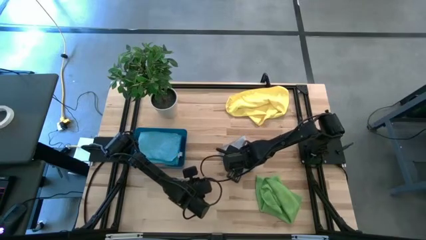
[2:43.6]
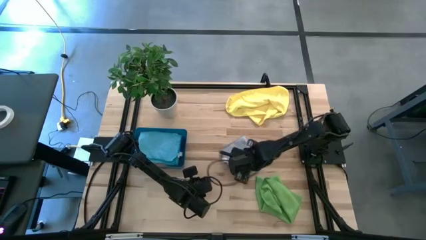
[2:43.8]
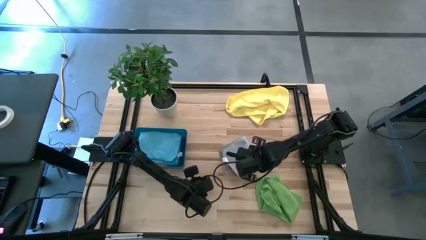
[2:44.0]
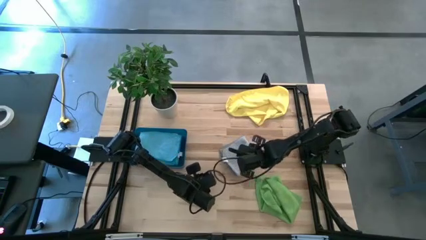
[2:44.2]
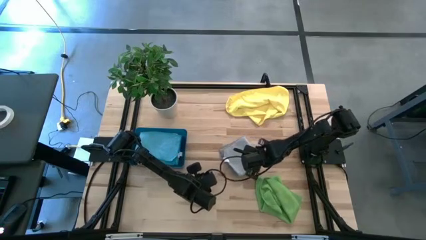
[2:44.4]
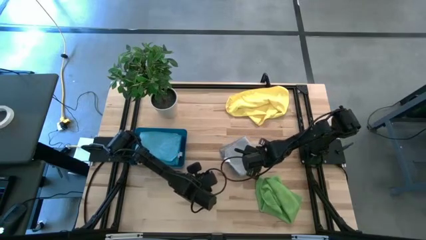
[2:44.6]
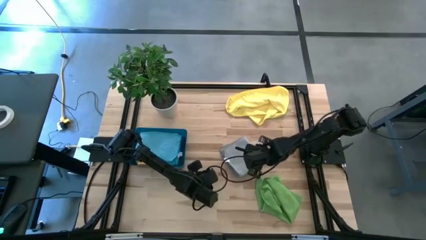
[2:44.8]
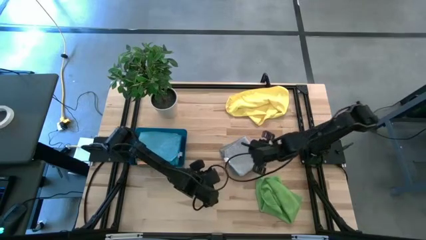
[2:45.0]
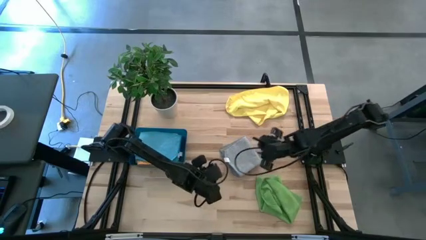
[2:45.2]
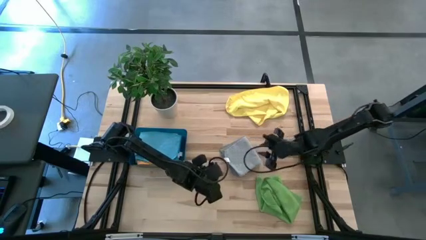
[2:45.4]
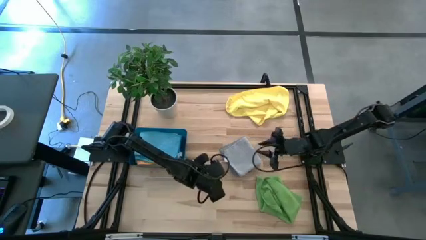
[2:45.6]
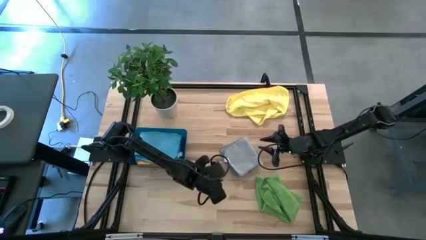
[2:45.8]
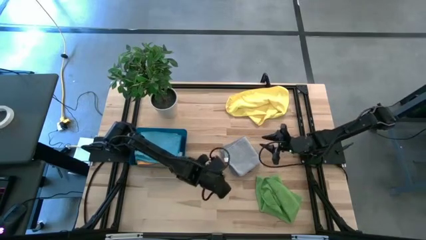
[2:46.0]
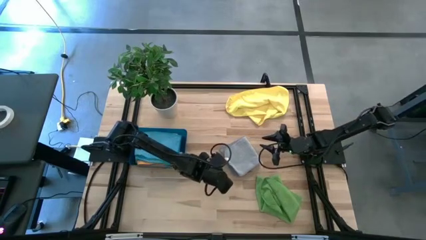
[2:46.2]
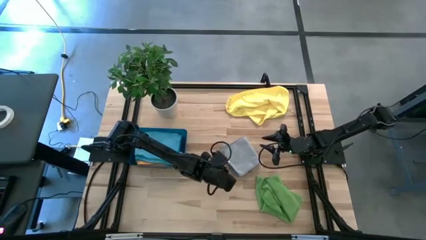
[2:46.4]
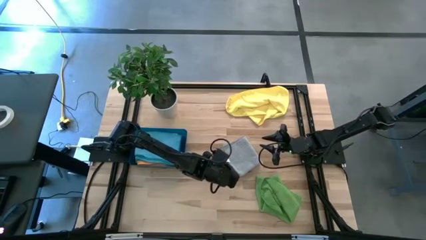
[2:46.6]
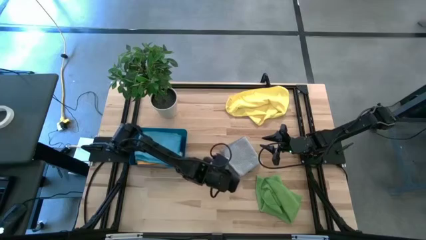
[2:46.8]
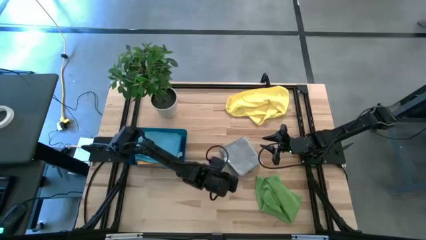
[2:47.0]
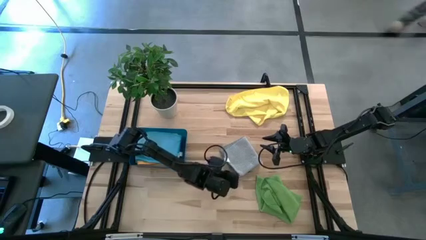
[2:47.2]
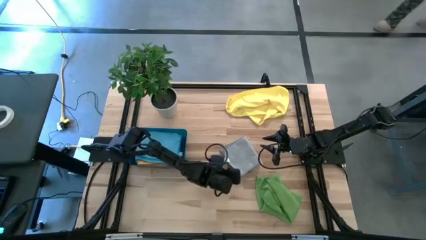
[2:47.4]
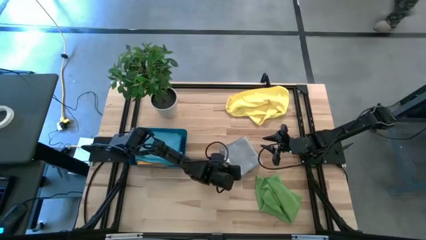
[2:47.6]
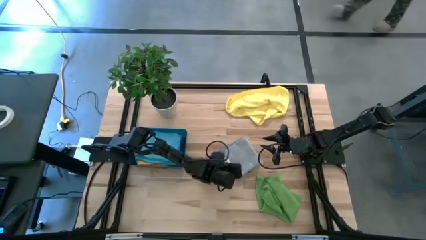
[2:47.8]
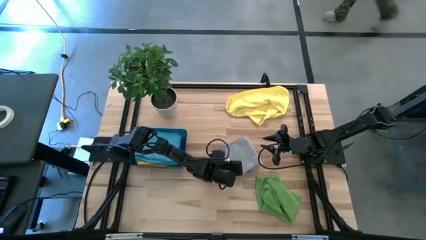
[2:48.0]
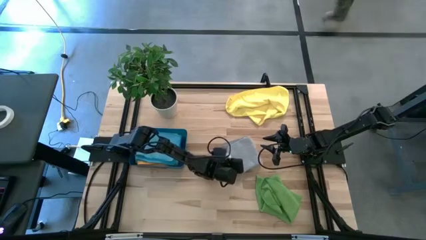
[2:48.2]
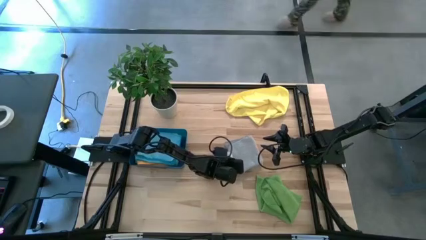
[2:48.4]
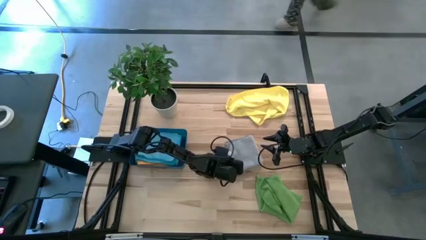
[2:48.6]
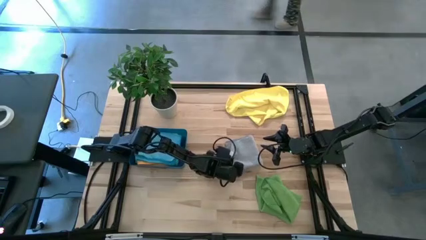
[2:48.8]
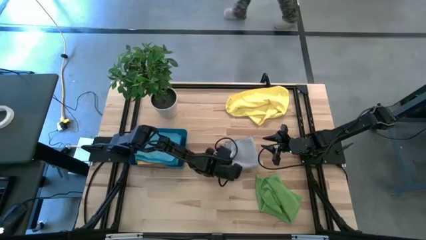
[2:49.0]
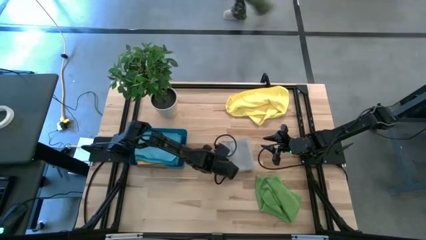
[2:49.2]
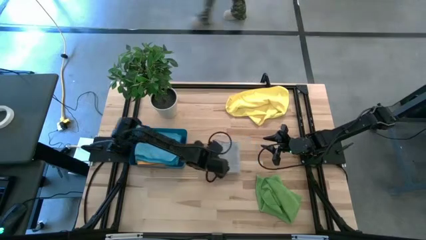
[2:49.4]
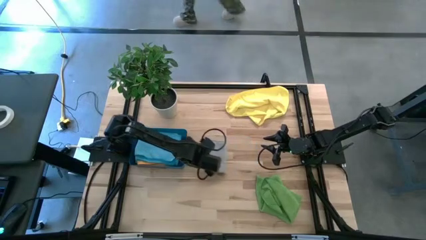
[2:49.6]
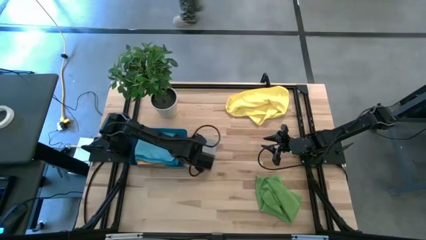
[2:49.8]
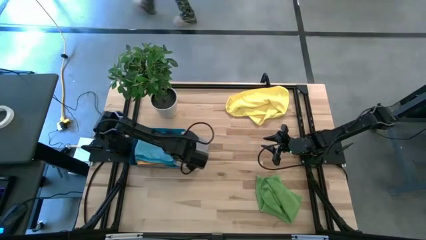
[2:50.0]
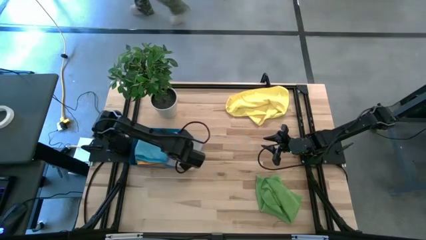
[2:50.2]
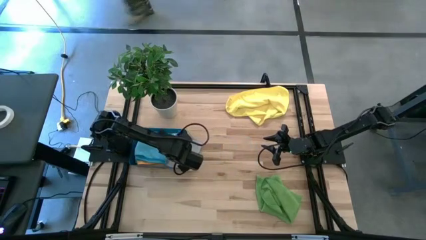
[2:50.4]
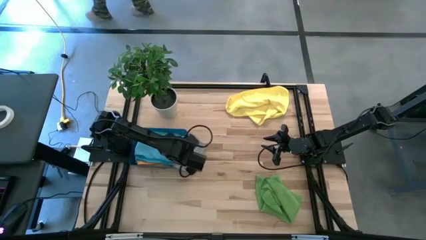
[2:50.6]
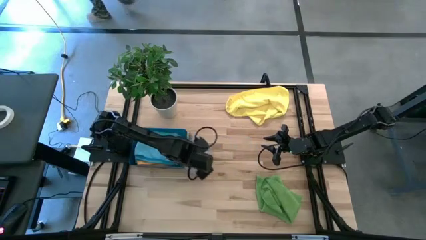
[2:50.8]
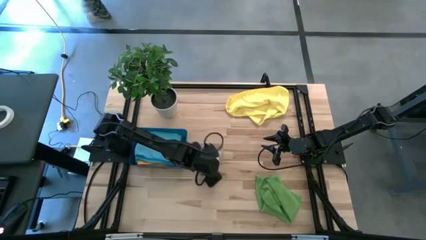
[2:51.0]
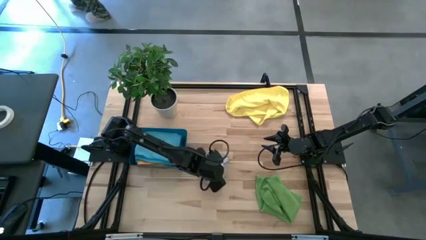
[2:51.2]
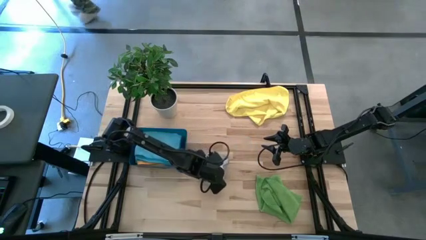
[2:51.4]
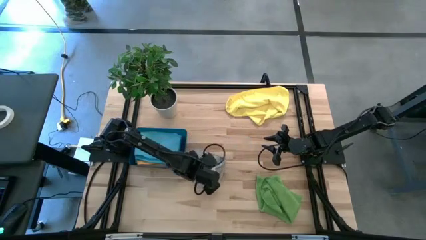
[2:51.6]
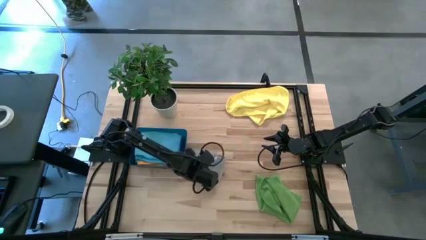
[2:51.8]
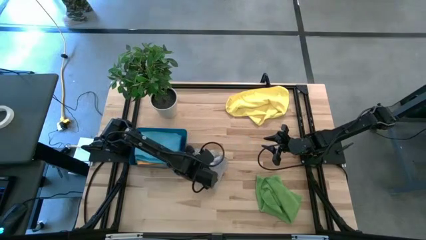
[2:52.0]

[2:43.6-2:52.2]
Task: Fold microfiber towels
Stack the gray microfiber towel on top of the blue microfiber towel in the blue bin

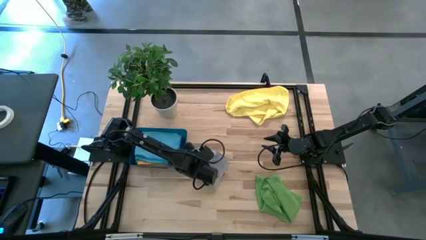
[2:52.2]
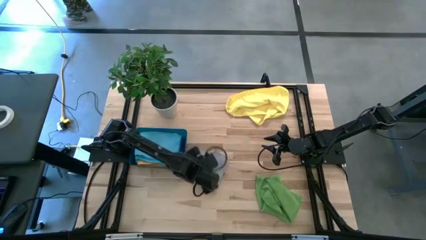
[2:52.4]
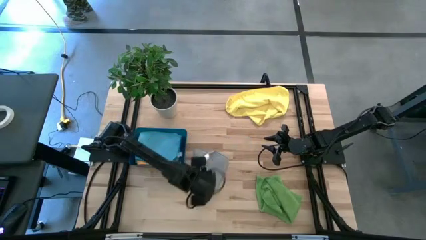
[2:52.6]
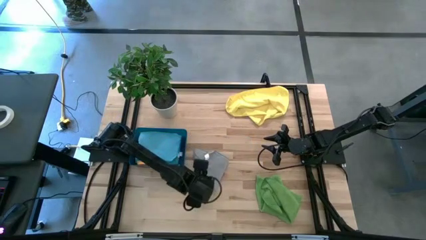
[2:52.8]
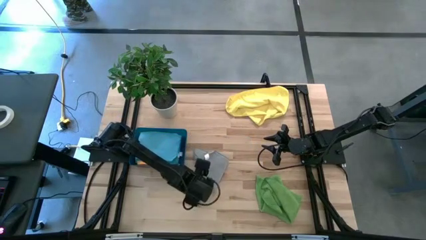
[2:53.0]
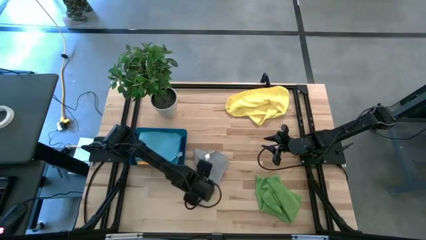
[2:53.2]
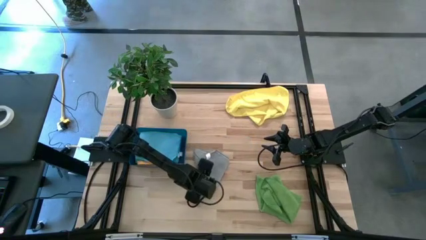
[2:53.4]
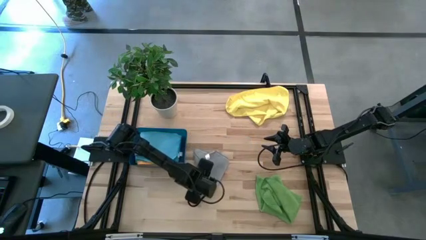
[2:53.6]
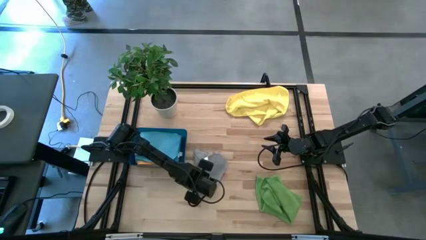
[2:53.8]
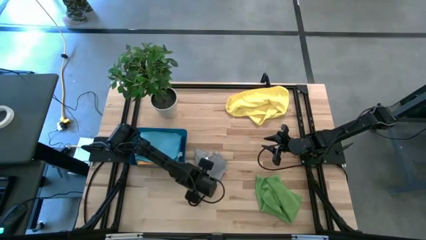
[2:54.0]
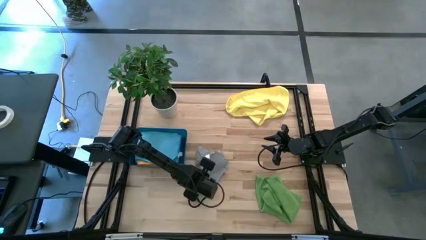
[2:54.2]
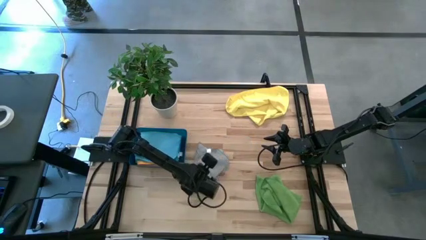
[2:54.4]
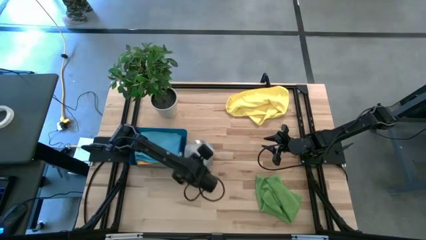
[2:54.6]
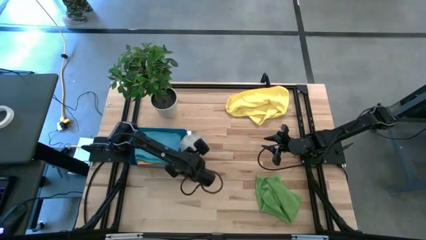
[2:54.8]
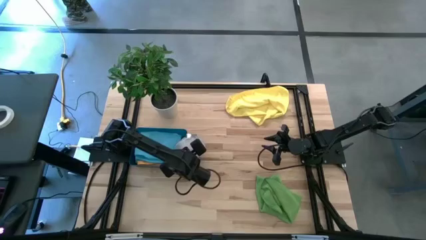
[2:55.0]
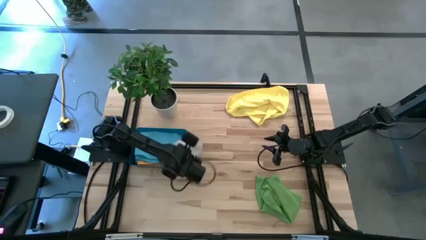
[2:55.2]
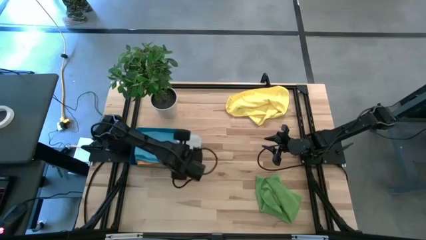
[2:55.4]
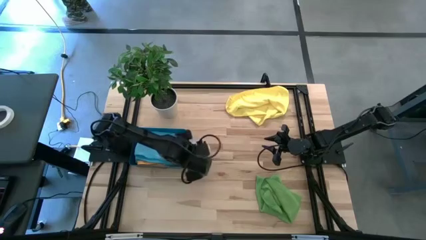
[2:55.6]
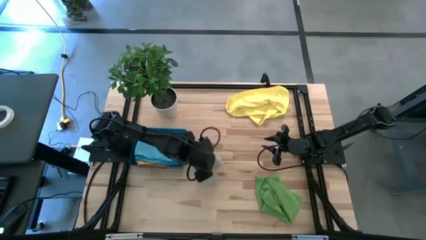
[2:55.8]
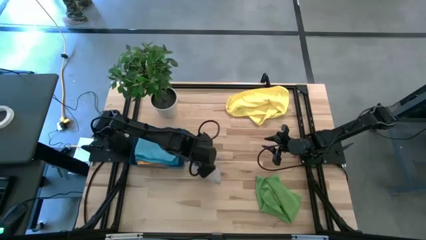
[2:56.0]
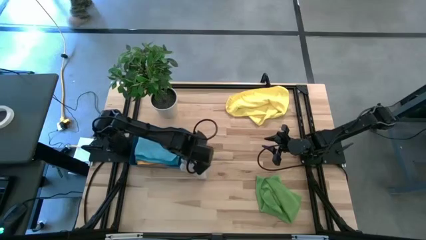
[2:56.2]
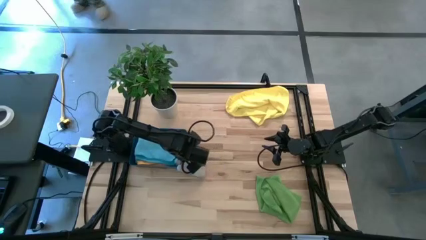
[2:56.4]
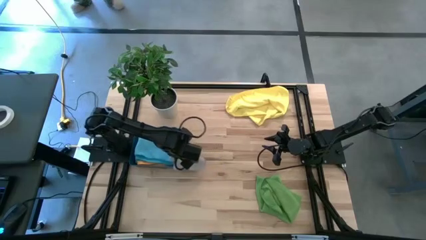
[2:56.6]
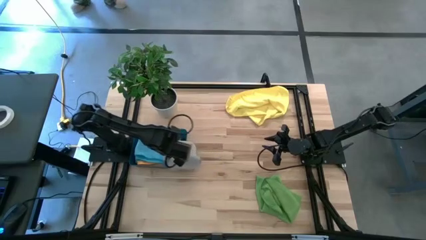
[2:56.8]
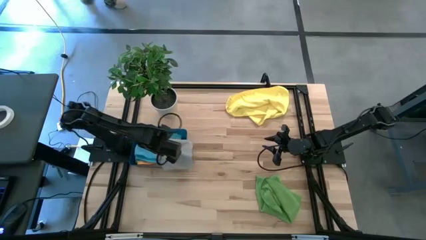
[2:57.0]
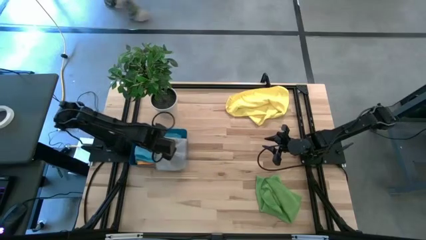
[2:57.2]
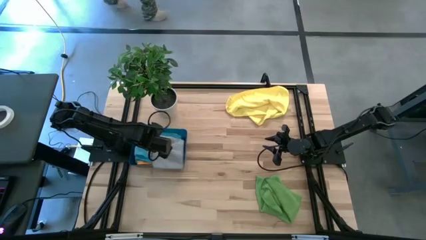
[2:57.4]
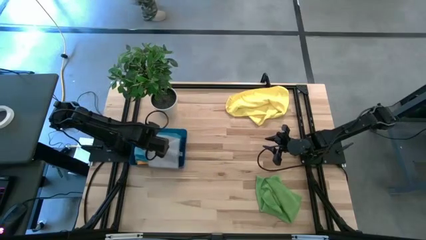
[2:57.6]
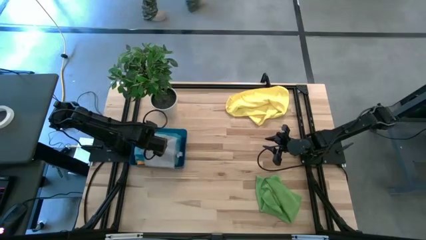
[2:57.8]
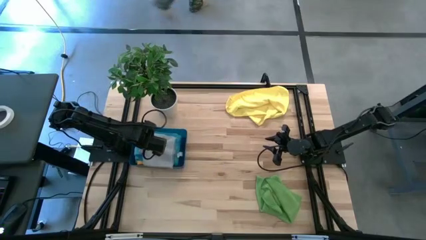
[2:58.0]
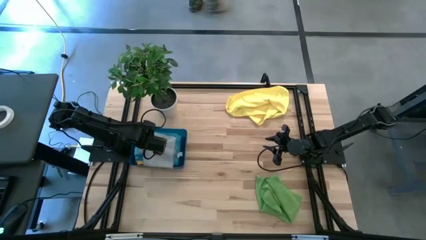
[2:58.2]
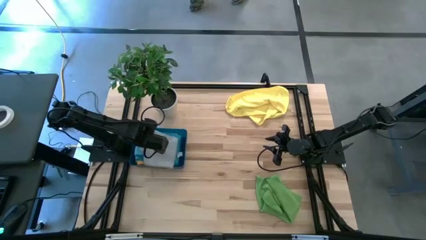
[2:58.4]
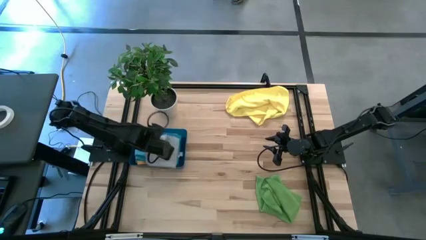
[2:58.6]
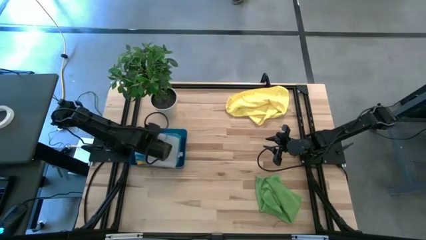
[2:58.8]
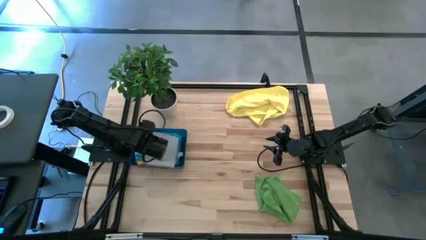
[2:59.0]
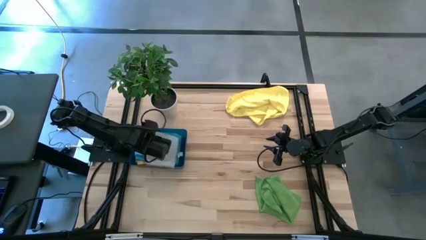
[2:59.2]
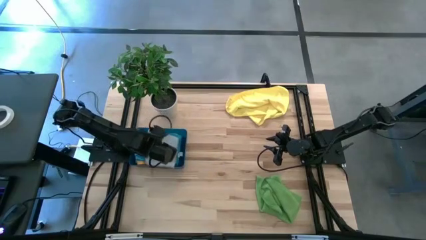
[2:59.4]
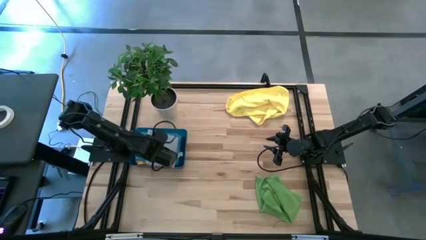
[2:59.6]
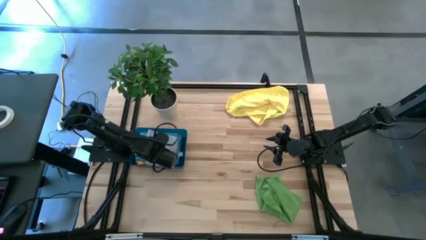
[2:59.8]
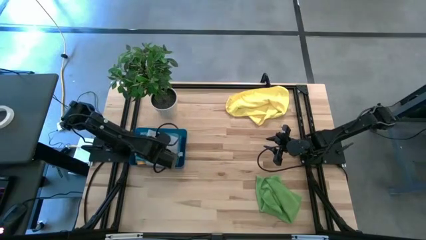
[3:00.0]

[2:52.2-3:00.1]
Stack the gray microfiber towel on top of the blue microfiber towel in the blue bin
